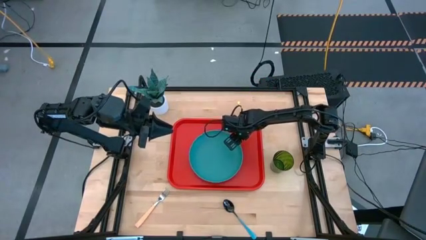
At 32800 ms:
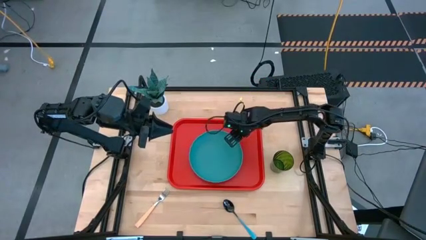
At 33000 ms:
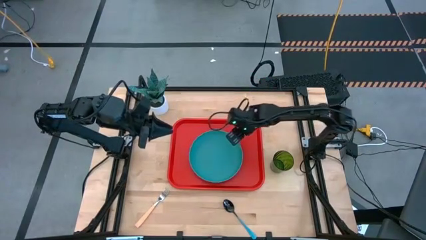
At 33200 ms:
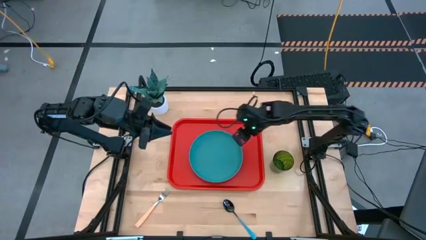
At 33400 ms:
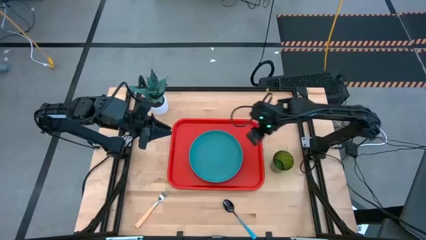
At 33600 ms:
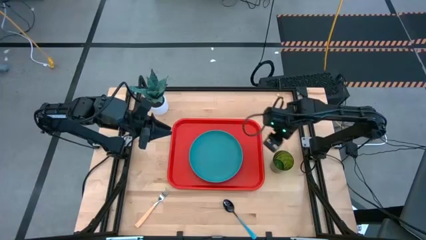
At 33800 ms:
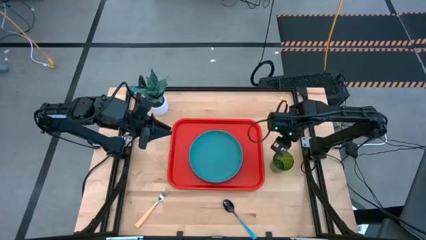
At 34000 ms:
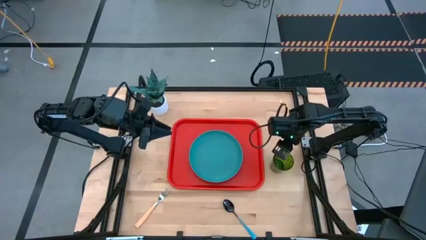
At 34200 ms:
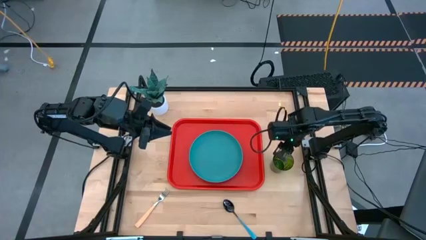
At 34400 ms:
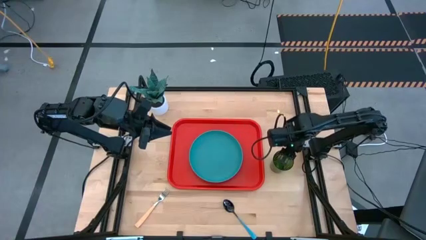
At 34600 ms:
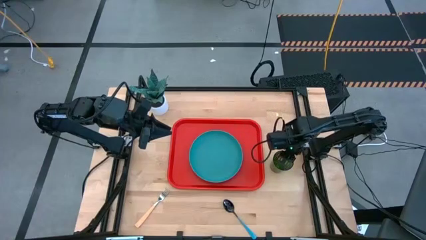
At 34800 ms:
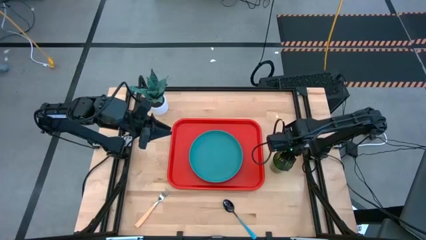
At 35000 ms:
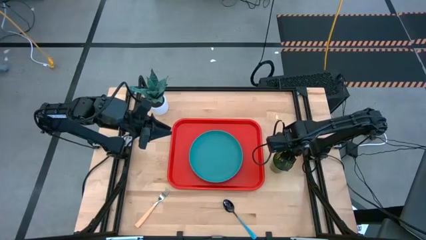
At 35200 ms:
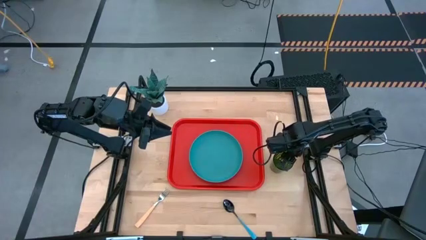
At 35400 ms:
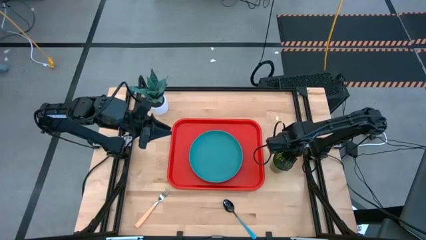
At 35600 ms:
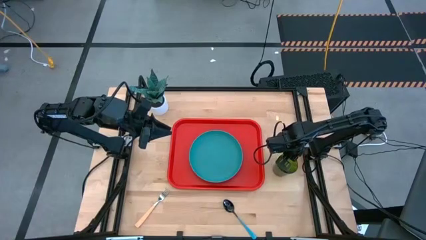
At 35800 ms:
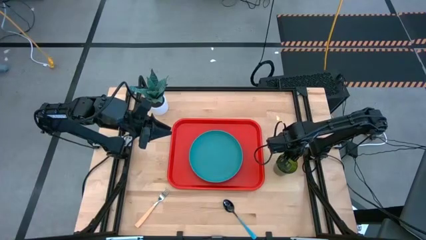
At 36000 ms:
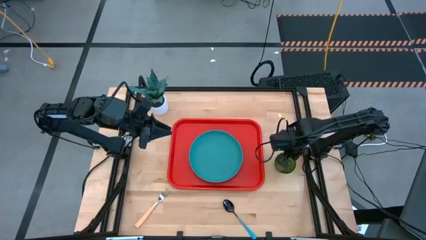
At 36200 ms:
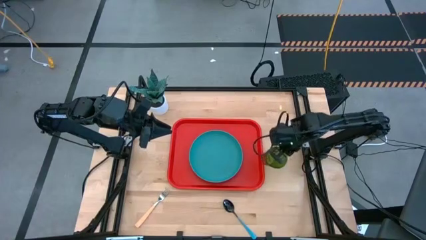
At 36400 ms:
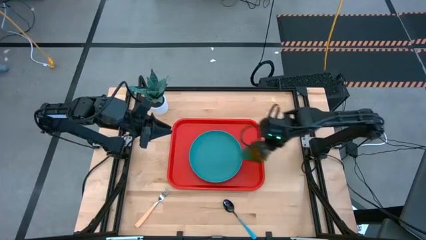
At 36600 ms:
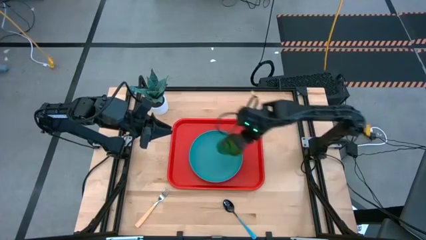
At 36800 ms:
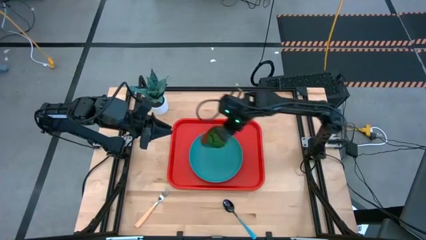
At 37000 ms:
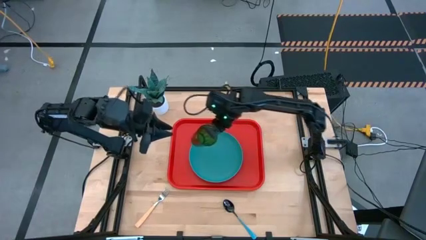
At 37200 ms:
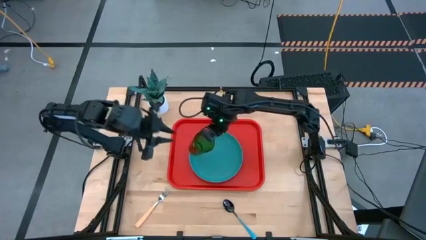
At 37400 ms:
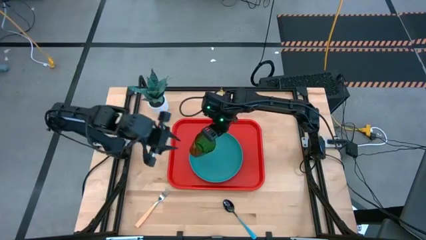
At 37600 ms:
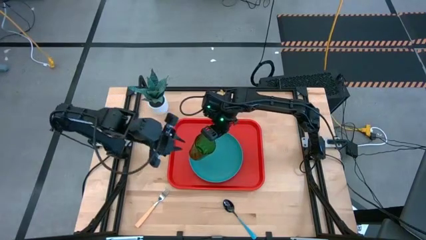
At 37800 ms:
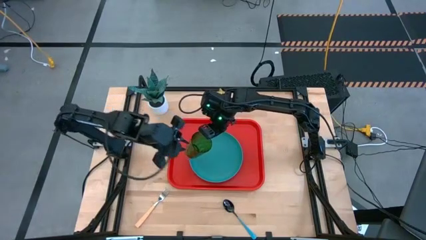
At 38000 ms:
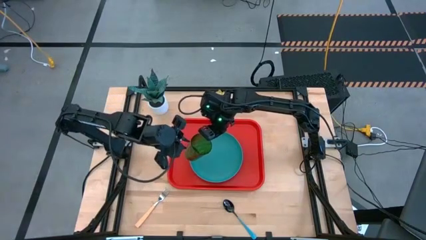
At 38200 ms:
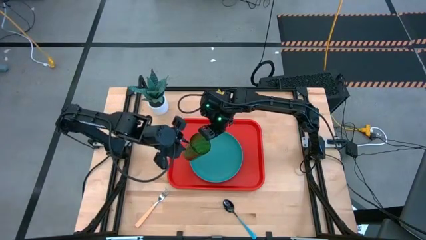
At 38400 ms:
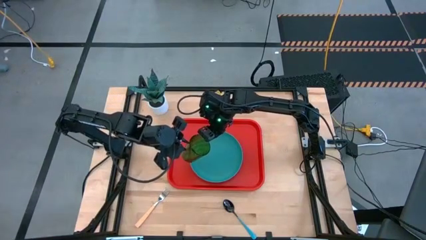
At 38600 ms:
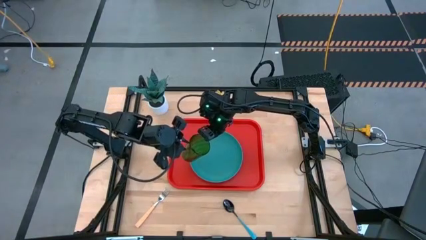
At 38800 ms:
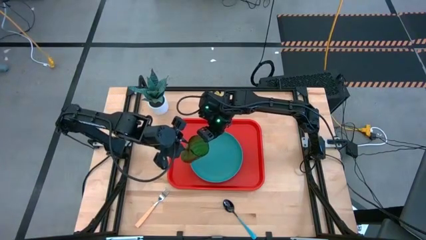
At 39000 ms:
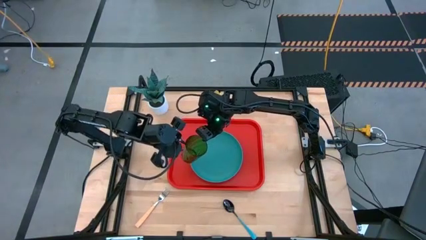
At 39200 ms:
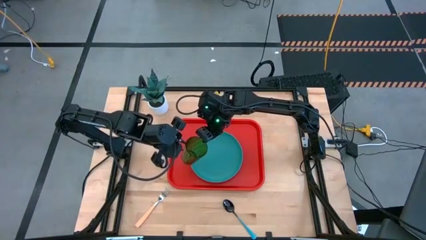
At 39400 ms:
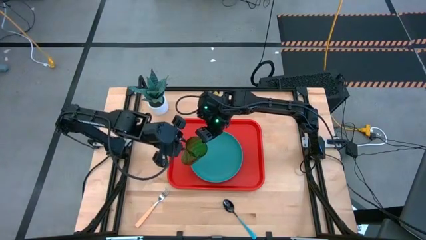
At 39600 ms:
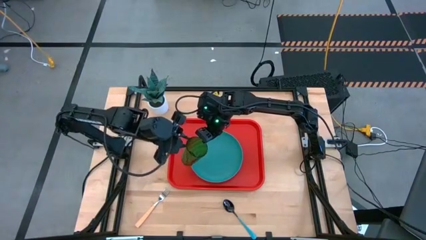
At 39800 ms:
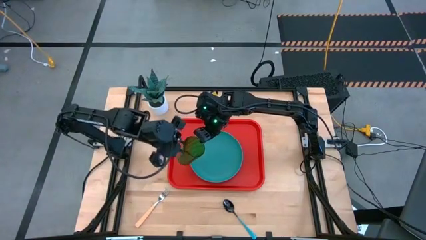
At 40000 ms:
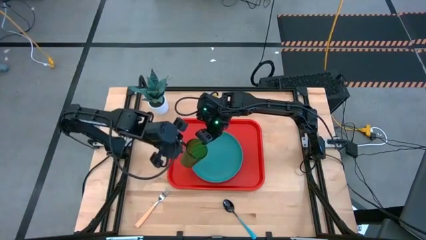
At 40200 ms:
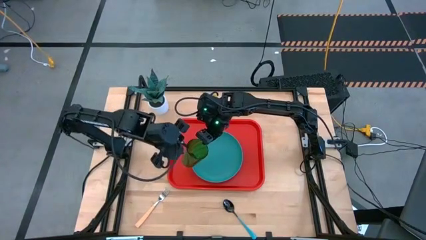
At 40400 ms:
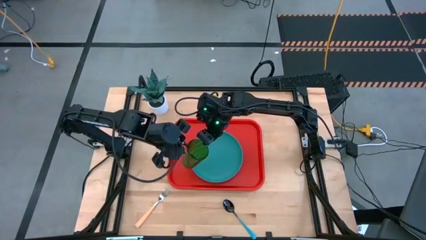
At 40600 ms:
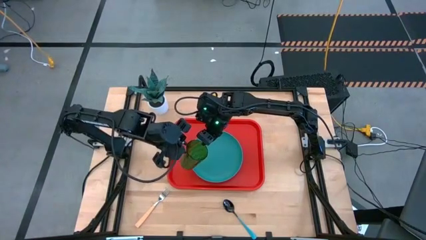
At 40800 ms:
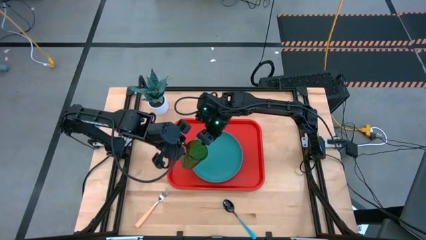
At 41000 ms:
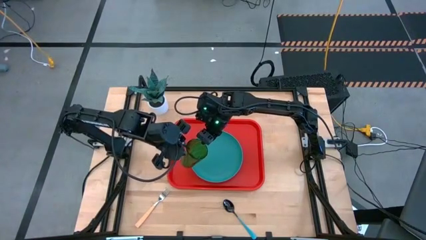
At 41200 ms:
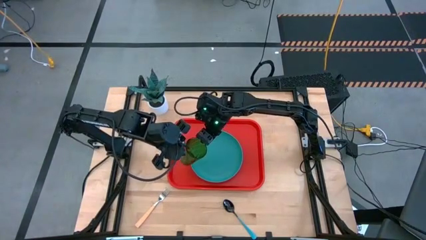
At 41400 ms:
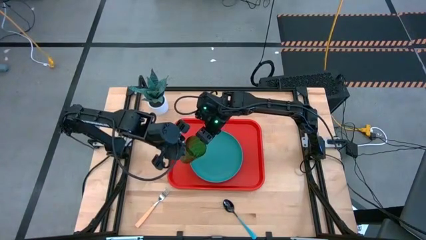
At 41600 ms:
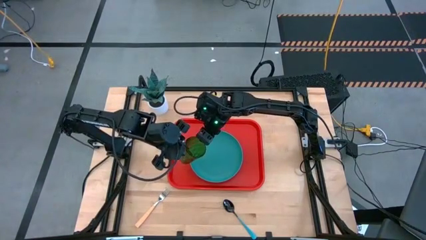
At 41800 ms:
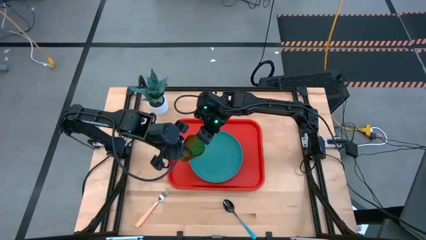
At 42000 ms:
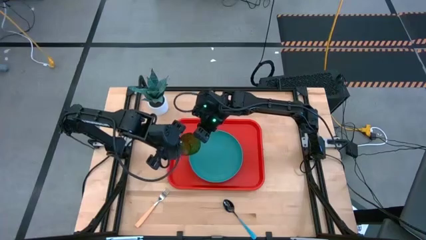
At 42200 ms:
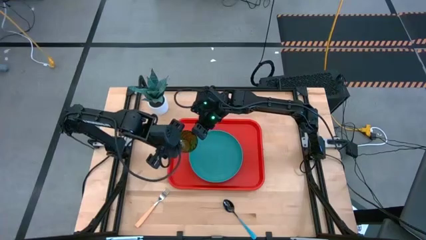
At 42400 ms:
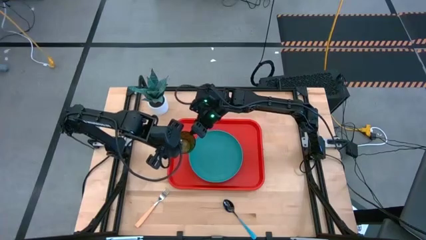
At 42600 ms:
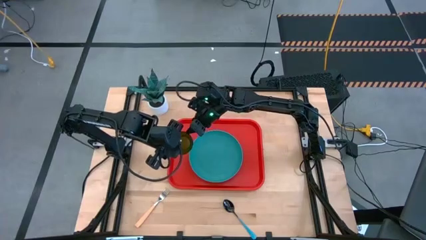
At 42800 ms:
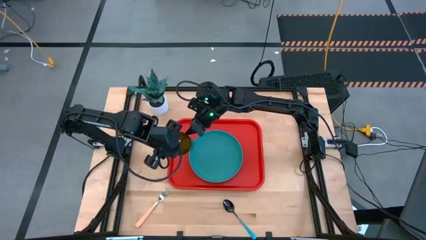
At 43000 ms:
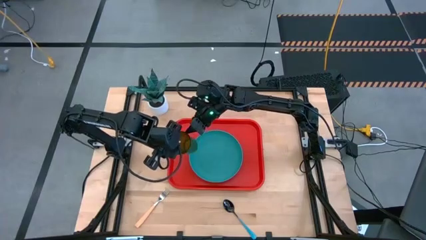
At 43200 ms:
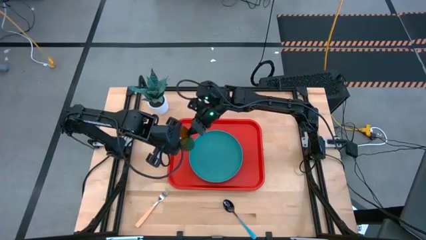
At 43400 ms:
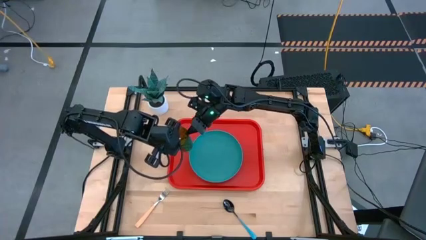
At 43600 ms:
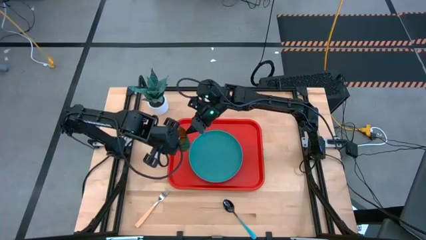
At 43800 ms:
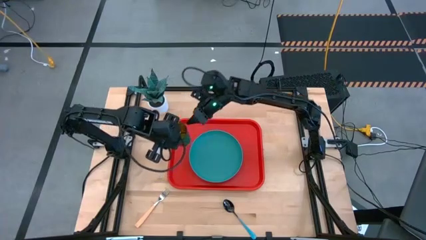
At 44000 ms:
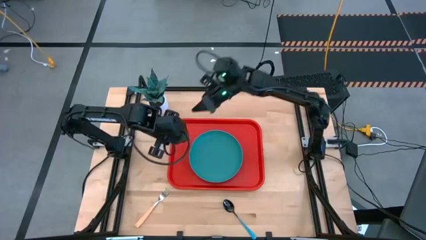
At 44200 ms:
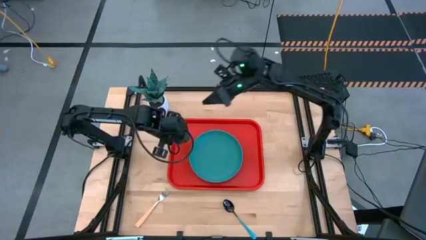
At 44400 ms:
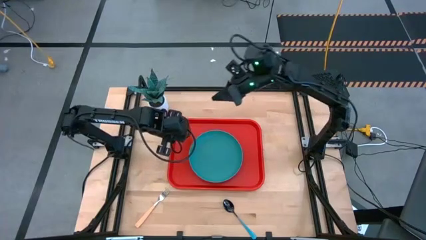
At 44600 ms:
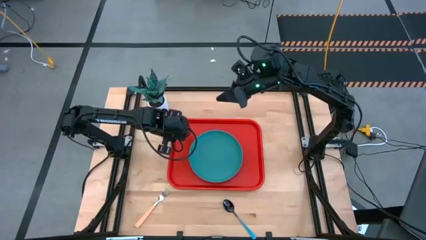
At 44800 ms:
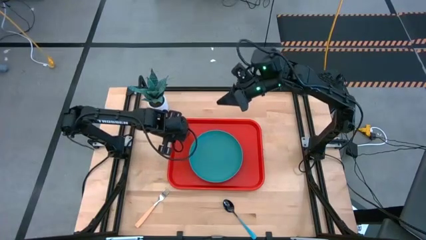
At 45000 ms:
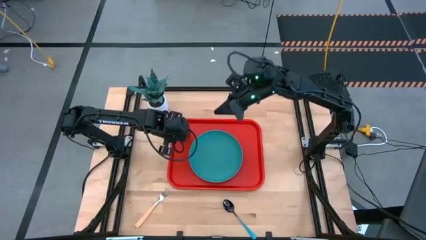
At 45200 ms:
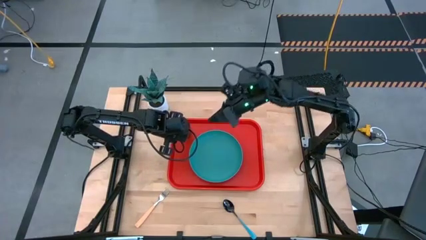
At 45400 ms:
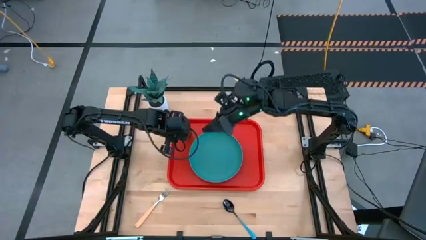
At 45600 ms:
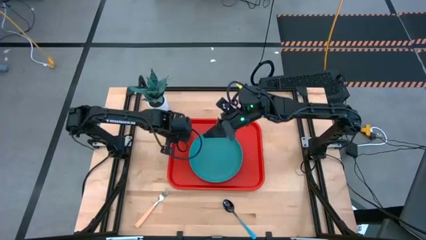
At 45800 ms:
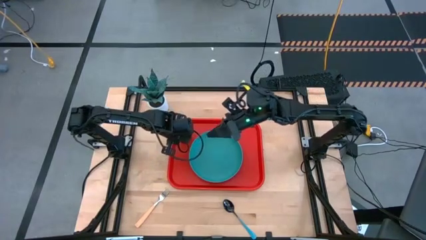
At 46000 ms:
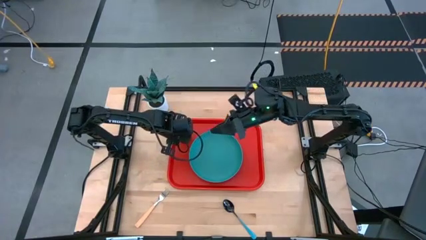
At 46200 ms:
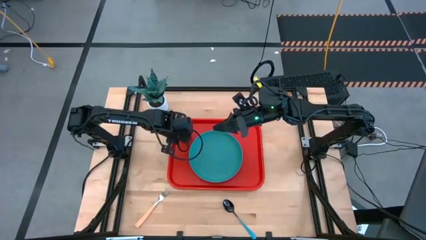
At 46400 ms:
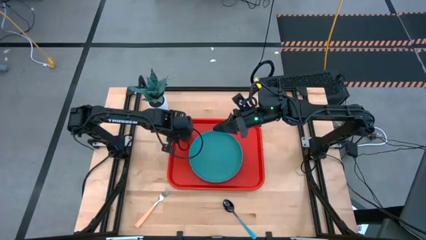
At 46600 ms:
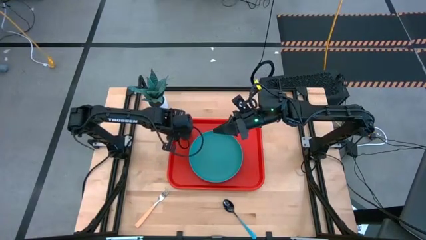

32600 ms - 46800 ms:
Task: Pick and place plate/cup/fork/spoon on tray
Put the green cup on the red tray to the top left of the blue plate

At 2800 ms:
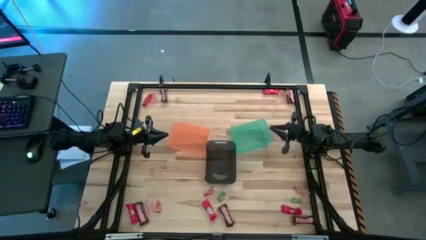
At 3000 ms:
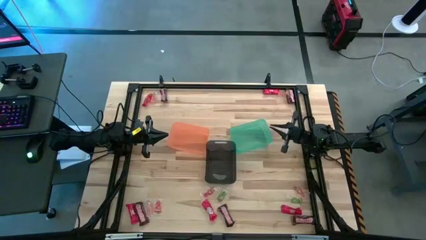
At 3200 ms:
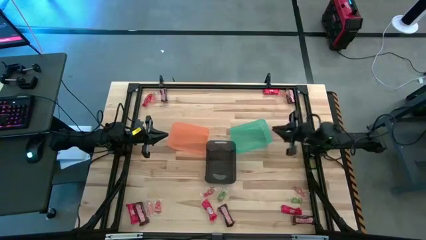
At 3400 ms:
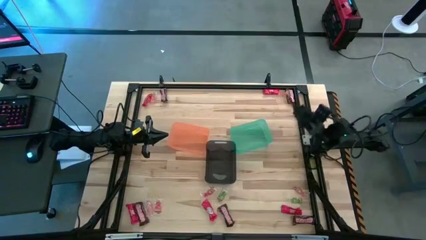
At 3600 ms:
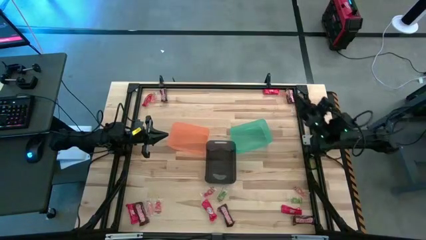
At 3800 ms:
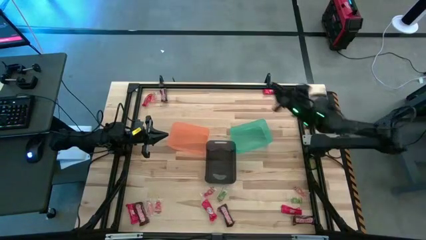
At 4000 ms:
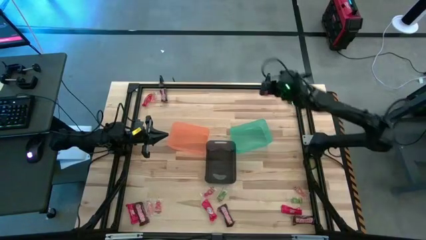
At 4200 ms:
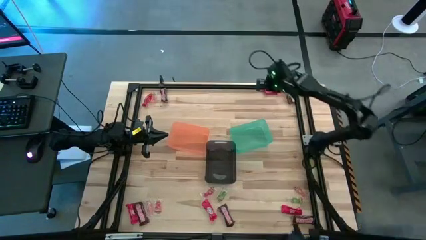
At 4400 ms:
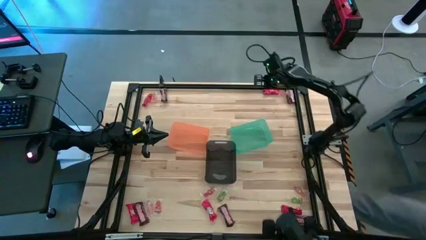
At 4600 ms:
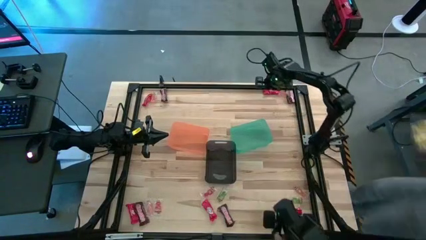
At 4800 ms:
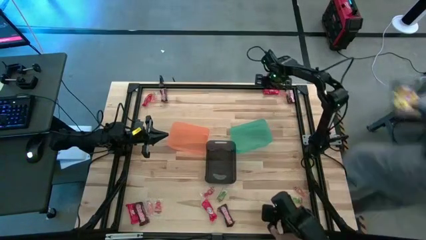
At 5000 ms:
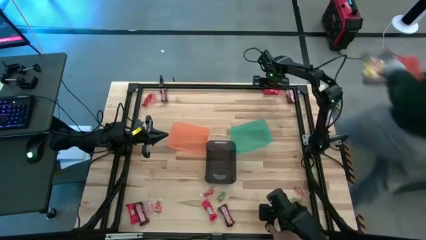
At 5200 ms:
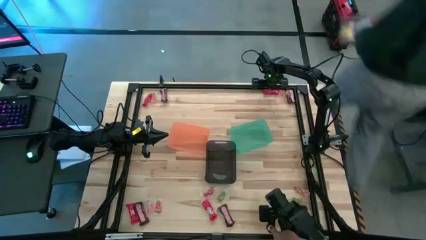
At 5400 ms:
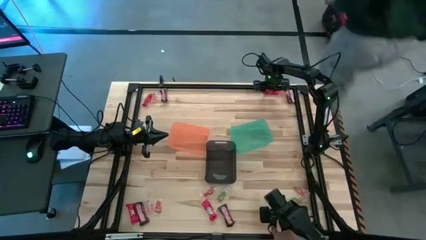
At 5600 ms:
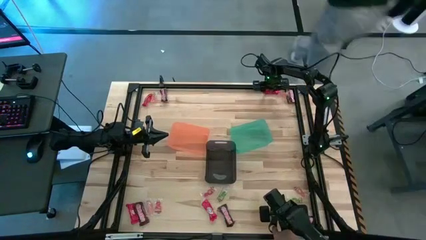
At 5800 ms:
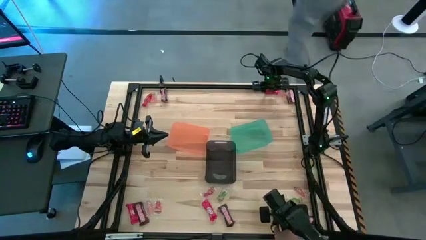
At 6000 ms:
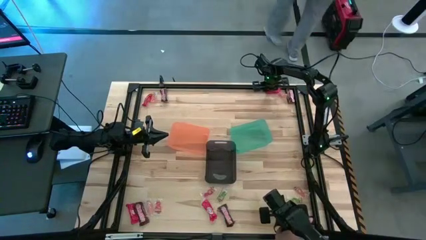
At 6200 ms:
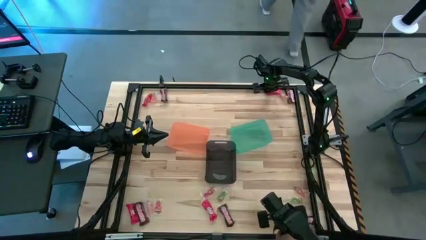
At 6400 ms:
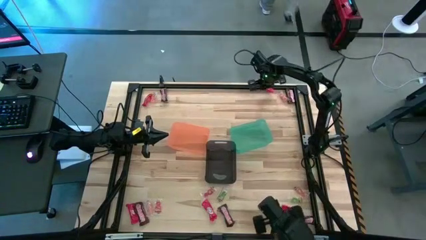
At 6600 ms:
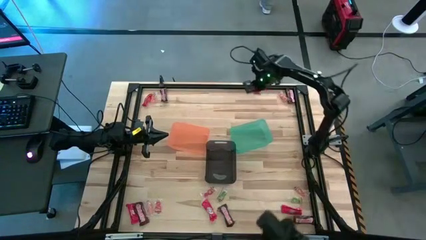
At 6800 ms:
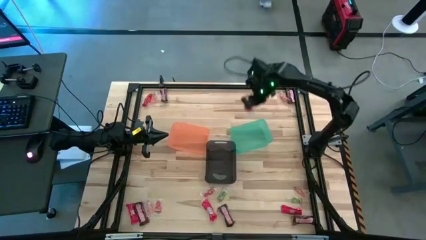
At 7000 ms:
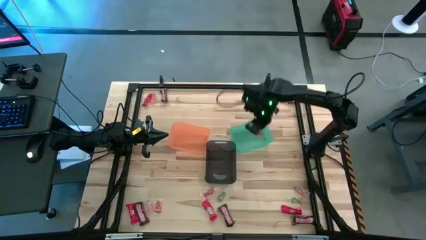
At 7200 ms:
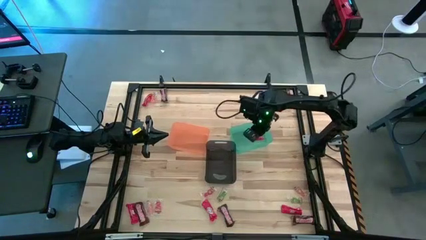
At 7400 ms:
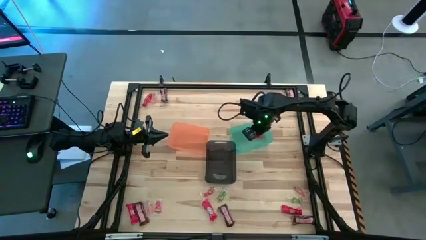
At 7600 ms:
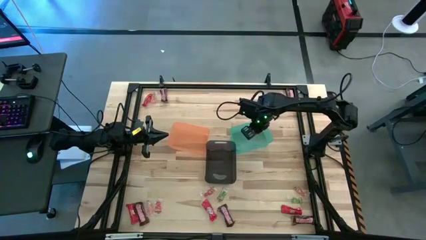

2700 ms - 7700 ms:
Task: Sort candy by brand, put in halloween buckets
Put the red chocolate bar into the green bin
